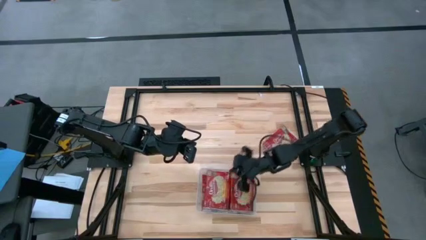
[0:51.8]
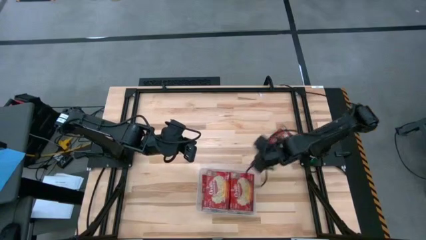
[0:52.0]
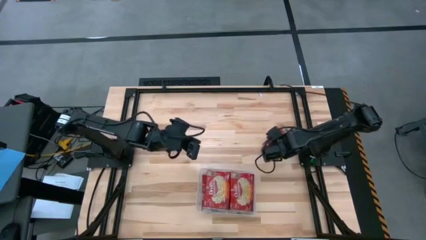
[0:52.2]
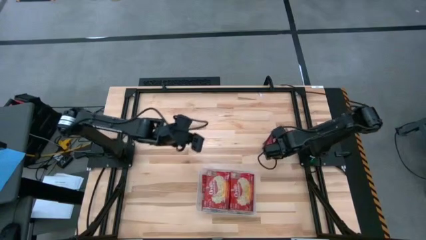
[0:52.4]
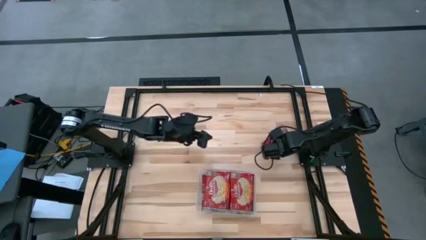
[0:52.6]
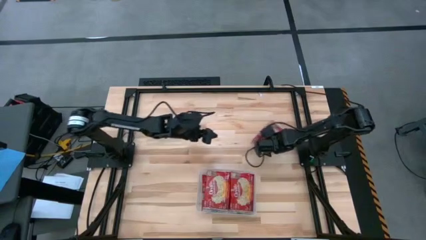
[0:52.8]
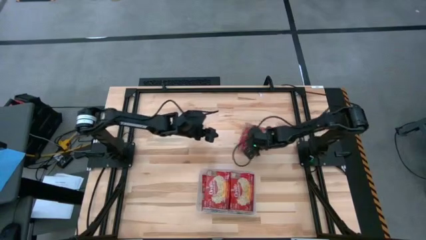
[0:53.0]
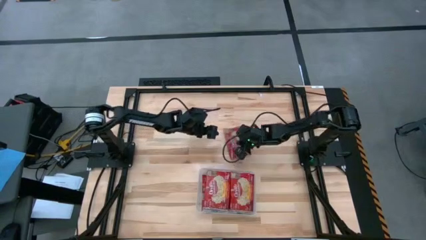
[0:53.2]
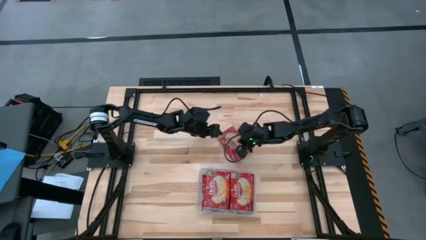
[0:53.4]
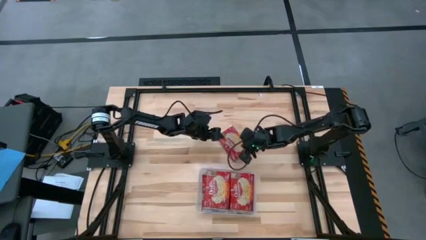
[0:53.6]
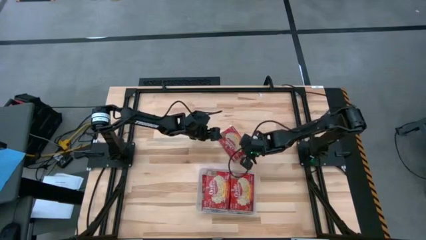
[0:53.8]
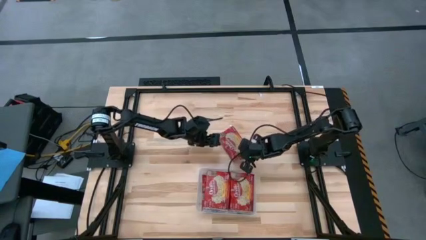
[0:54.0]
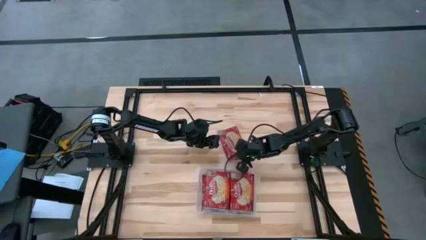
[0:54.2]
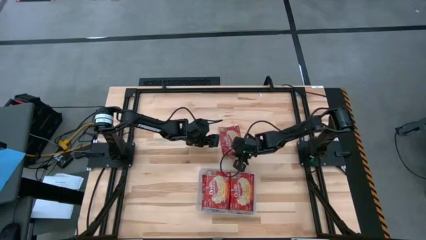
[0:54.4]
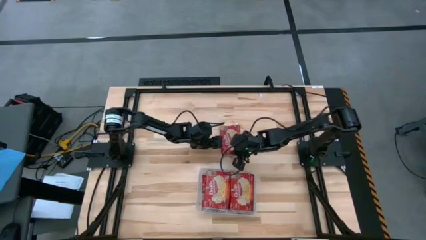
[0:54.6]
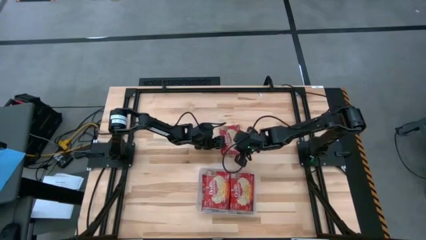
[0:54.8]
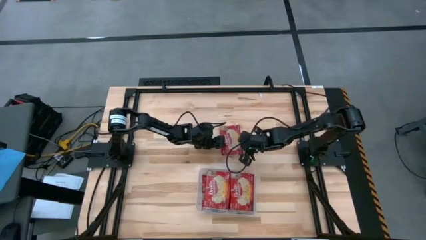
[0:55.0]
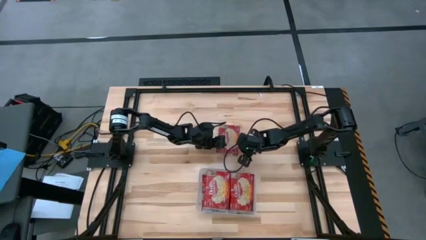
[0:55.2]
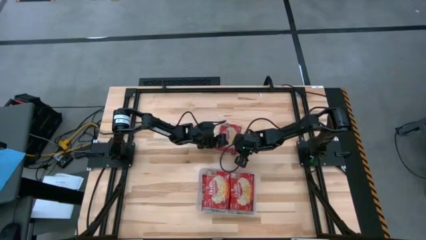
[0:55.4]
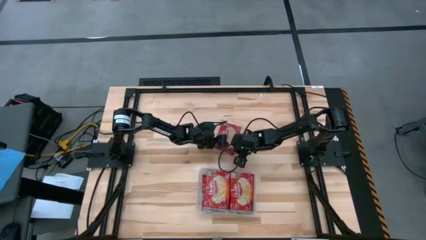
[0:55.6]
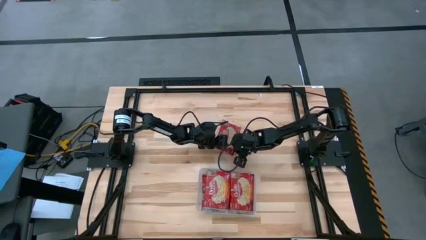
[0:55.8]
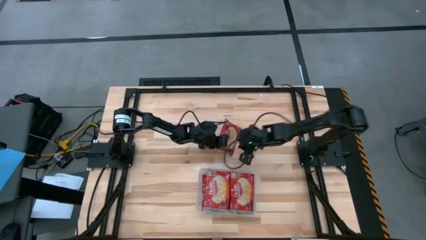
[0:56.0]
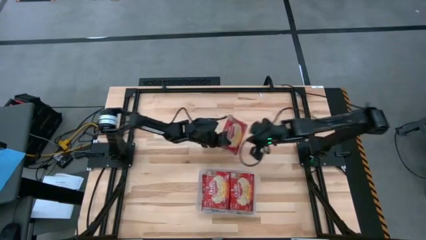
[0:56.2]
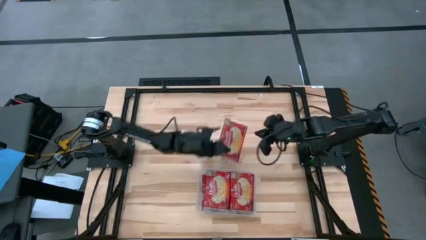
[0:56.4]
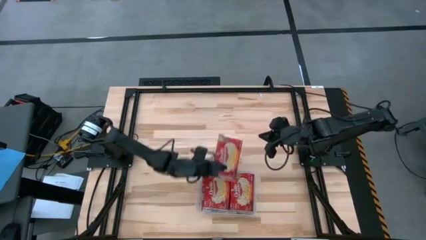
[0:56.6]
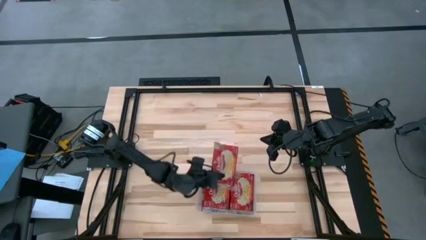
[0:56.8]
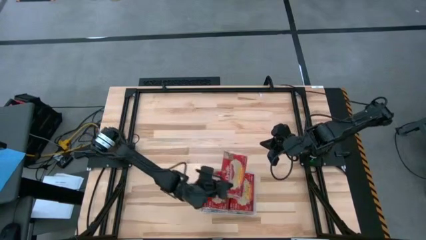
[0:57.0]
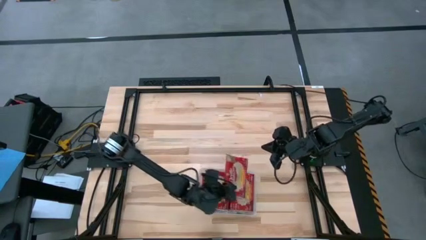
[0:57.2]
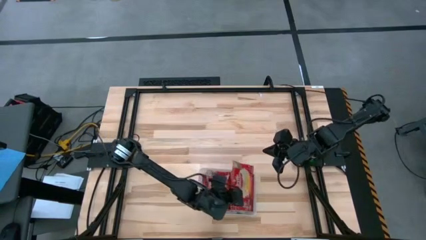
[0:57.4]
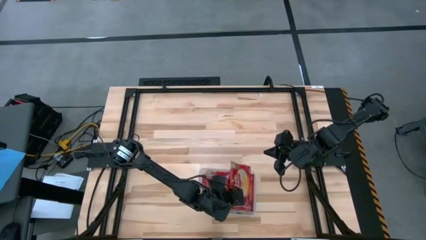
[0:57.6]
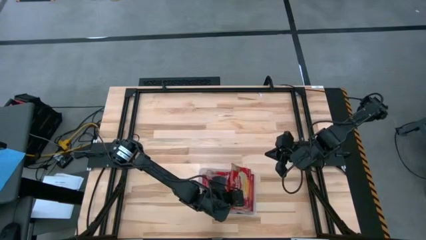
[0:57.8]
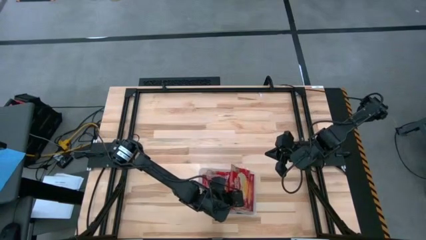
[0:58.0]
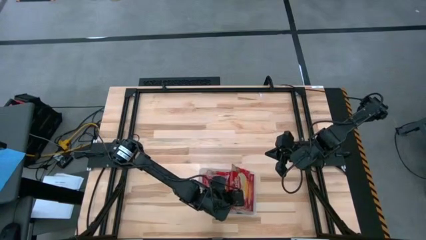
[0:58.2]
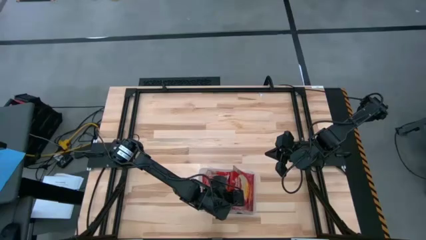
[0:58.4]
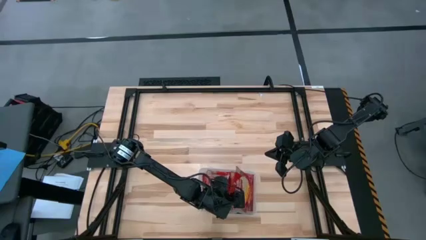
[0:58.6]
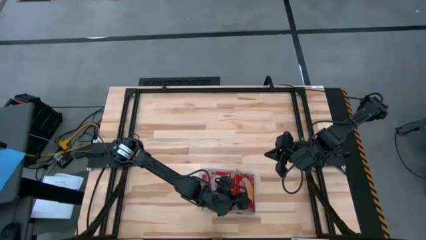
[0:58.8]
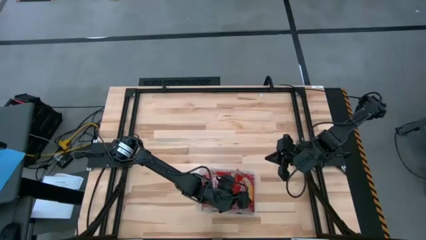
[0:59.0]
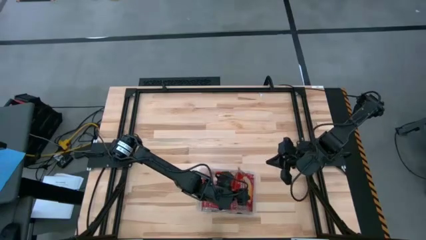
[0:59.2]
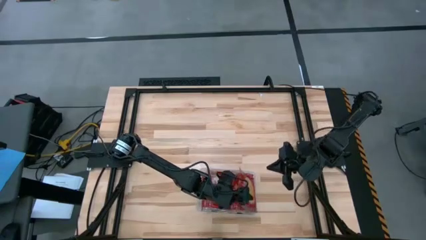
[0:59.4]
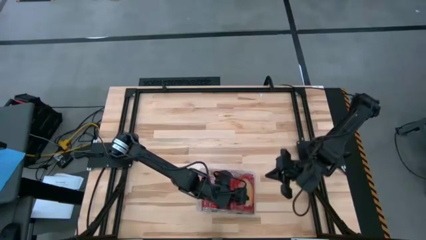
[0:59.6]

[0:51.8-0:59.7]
Task: Sort popcorn bags into baskets
Put the red popcorn bag into the white bin

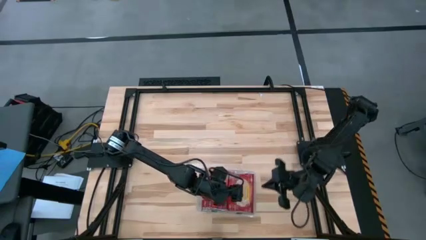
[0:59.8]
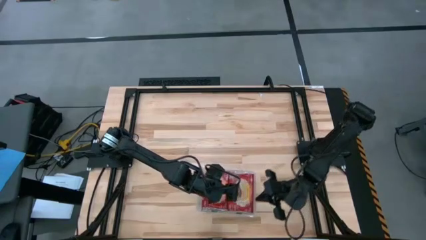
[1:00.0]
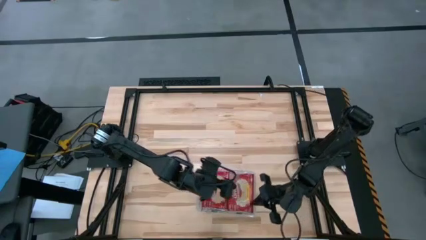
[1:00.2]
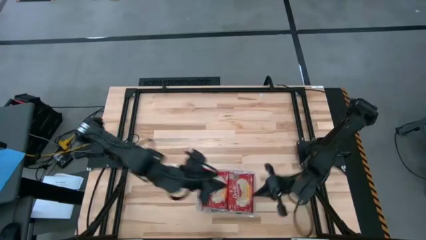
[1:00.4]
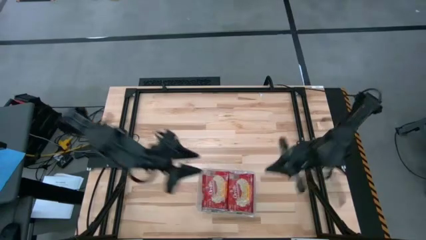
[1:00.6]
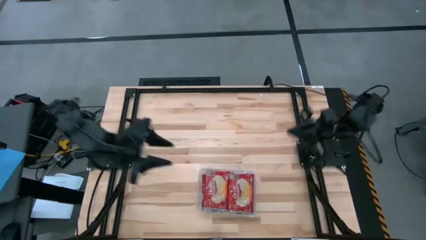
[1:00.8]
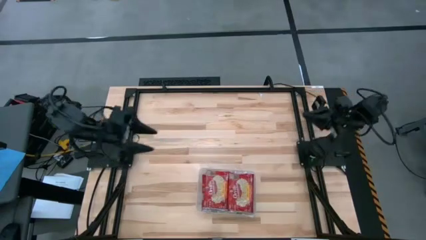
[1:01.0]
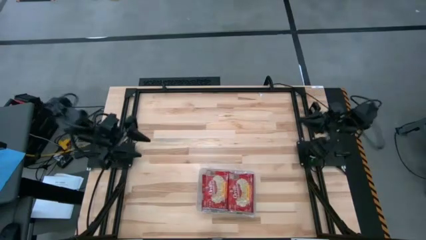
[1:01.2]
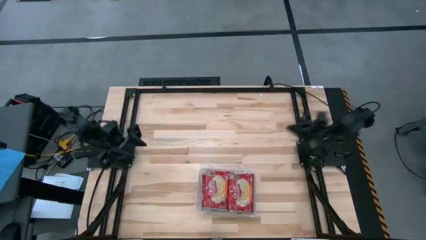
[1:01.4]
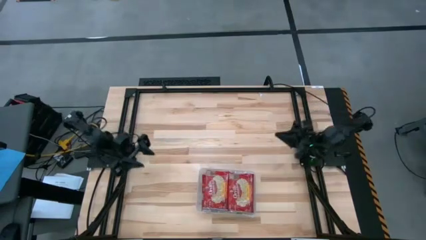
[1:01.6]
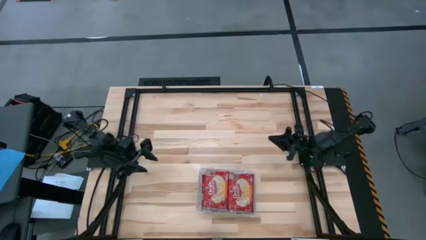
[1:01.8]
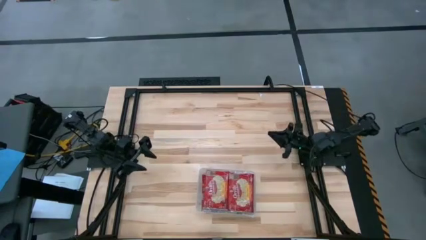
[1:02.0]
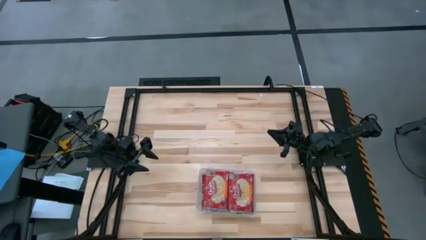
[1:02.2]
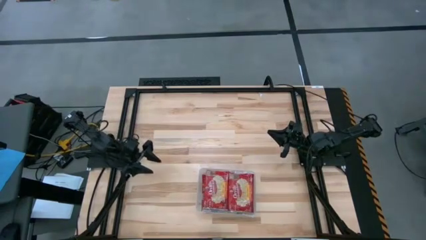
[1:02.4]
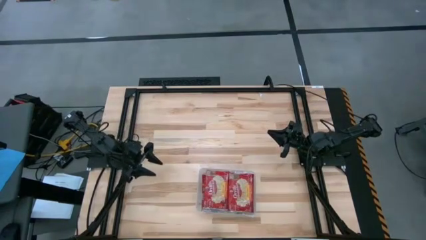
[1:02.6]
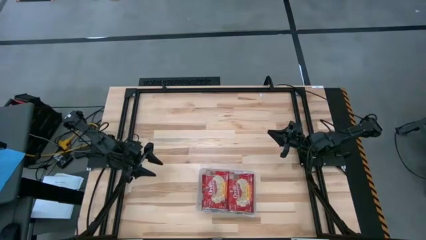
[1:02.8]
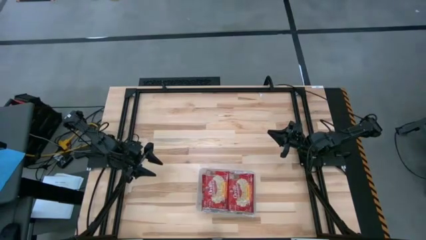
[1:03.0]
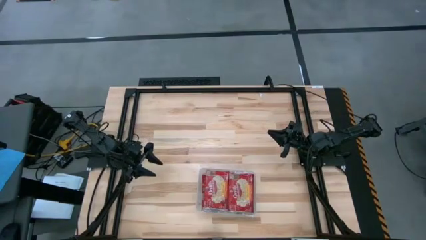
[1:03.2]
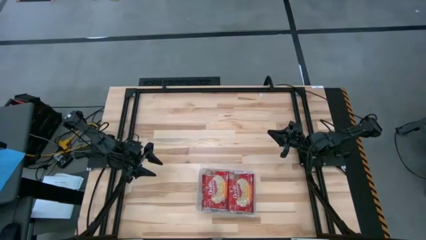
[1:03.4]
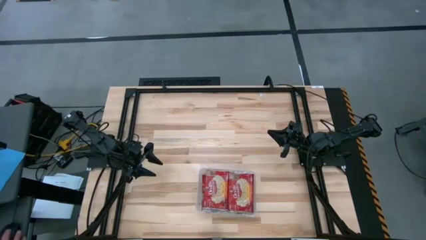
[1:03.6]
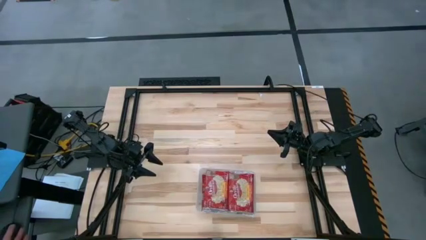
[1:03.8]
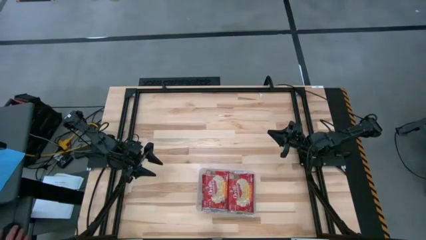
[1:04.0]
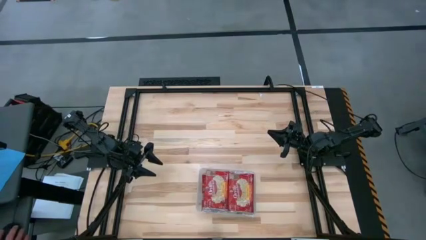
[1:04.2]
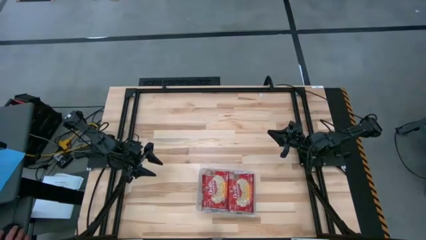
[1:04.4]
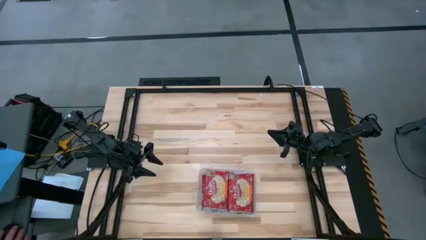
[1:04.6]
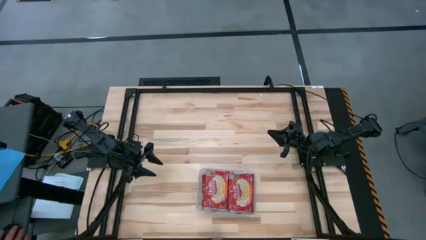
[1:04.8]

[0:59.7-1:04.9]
Return to Home Position

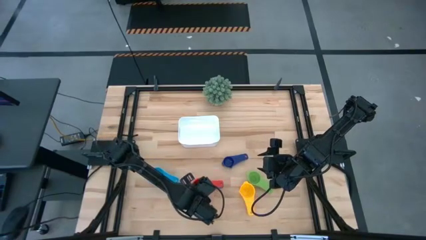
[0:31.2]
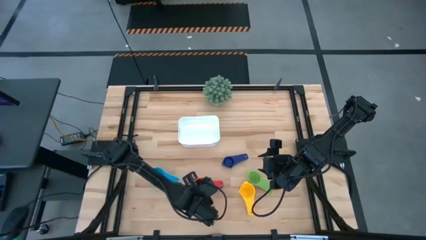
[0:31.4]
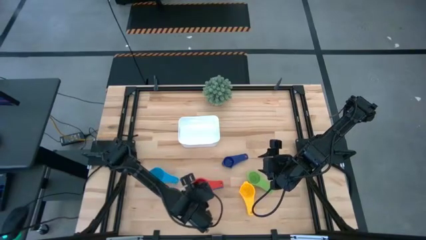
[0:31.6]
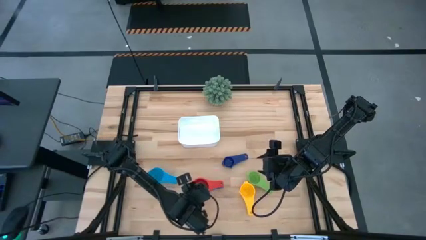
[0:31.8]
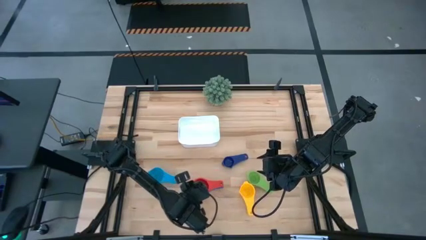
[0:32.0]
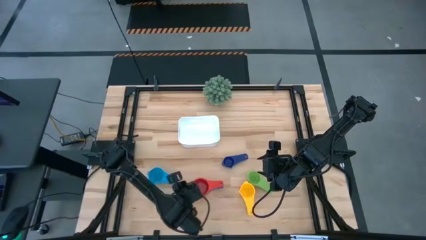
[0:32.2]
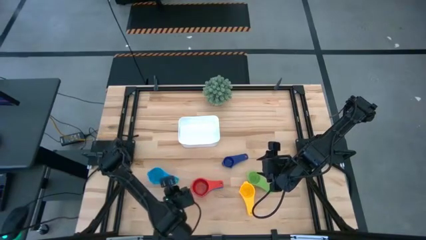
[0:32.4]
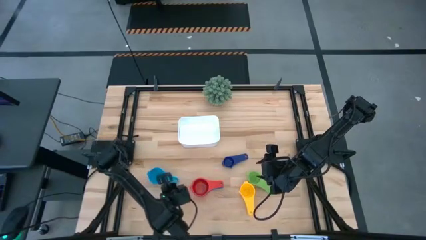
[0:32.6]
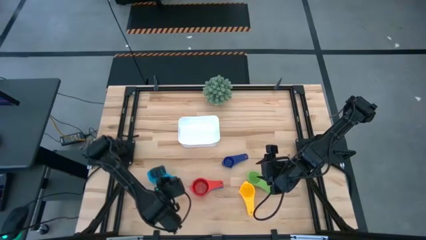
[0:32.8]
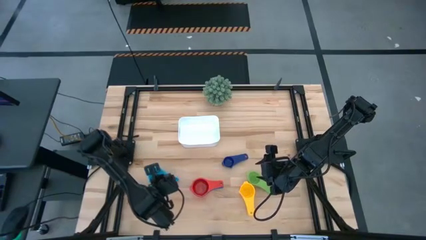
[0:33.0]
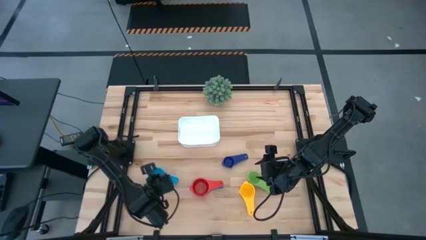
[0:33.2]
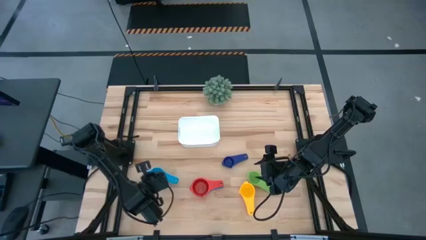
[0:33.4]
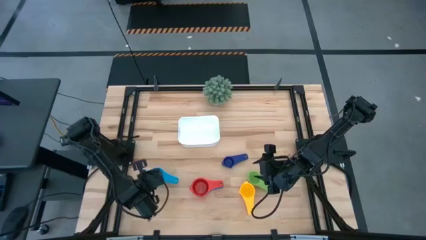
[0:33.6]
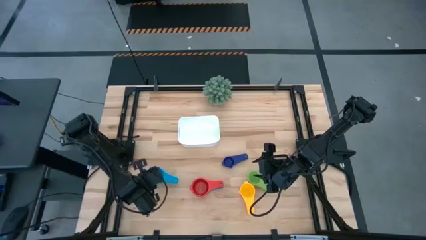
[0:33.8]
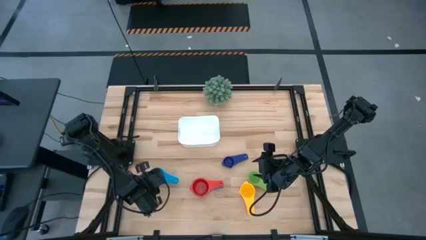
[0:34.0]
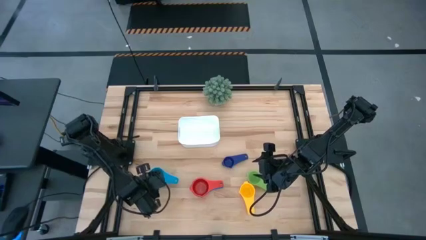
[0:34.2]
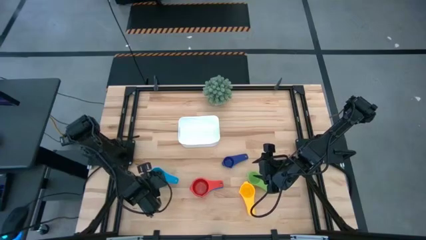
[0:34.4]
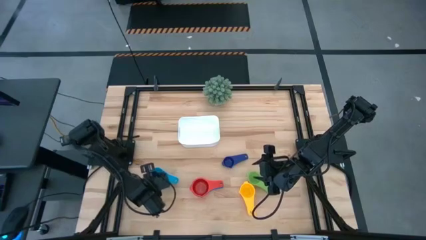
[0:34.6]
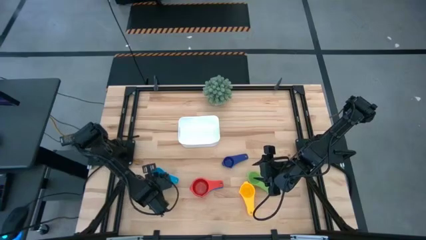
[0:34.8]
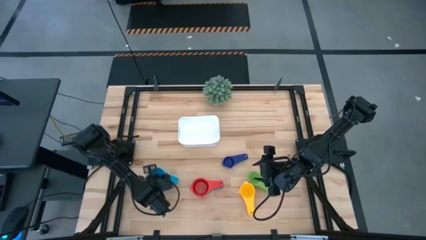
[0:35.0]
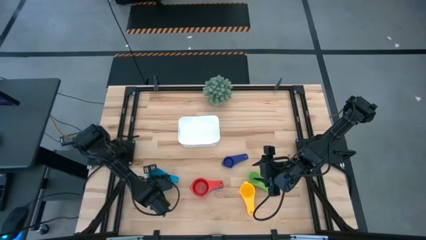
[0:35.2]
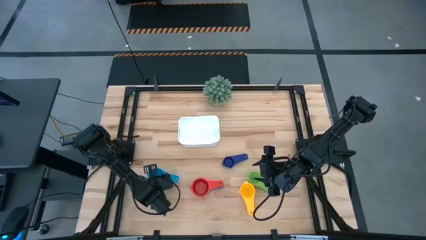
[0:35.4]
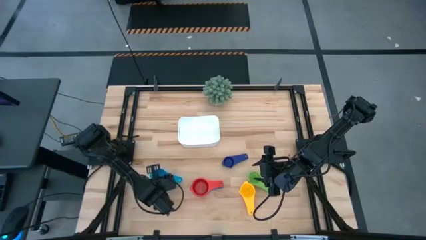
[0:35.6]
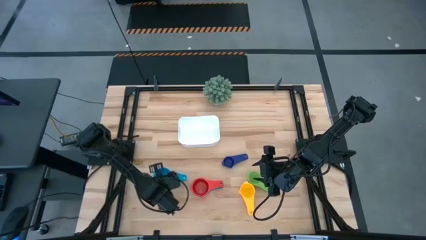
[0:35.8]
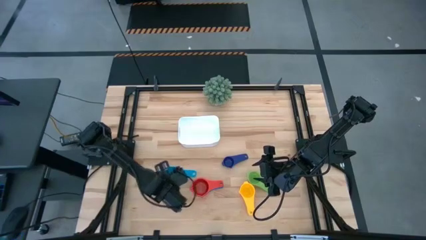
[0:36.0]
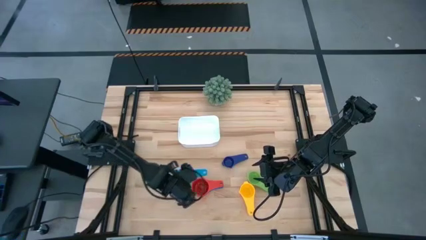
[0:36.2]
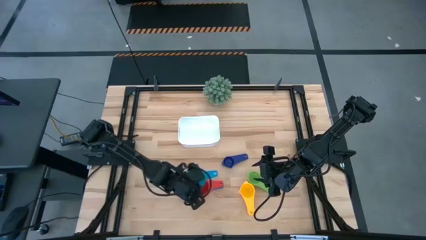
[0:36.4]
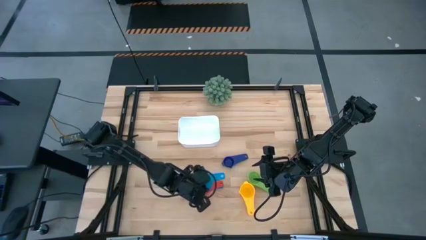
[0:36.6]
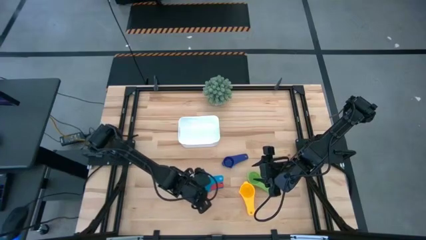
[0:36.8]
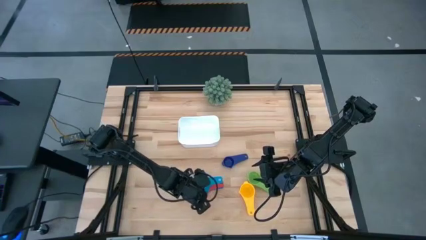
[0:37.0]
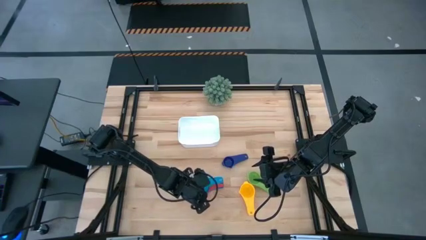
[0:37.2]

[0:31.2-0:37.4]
Task: Nest measuring cups in basket
Stack the light blue measuring cup on the top of the red measuring cup
